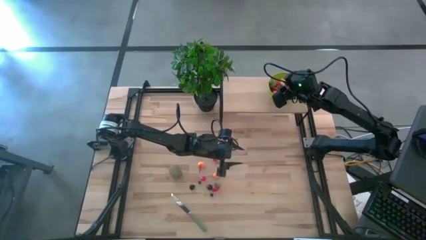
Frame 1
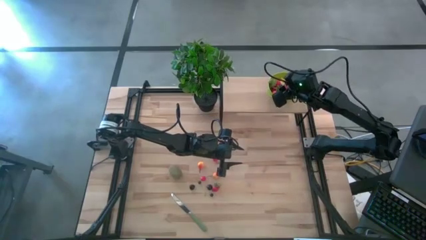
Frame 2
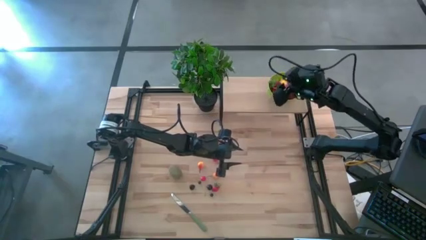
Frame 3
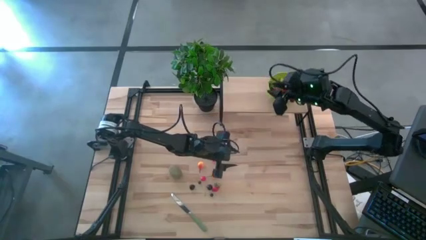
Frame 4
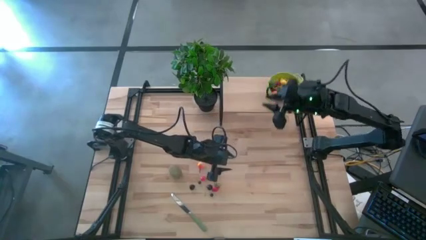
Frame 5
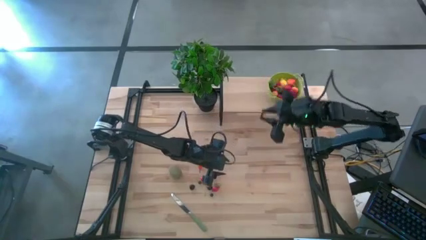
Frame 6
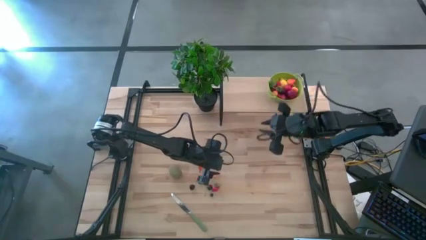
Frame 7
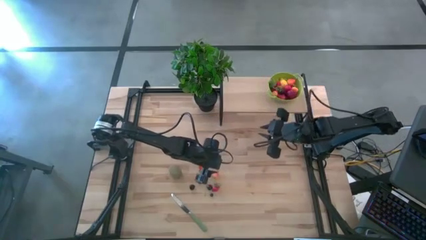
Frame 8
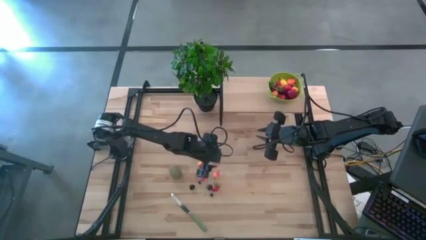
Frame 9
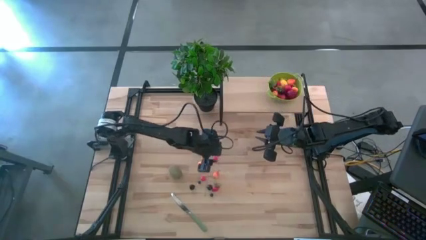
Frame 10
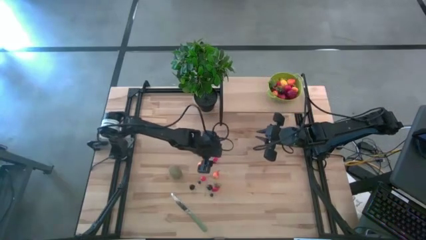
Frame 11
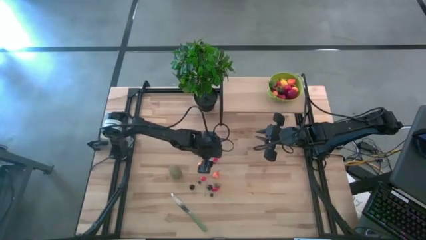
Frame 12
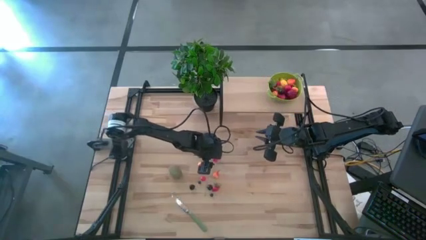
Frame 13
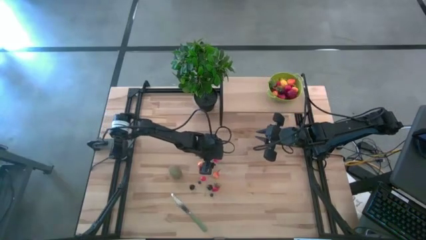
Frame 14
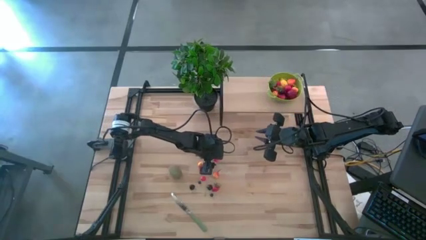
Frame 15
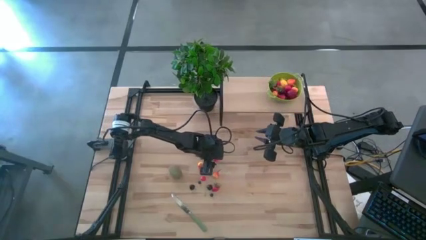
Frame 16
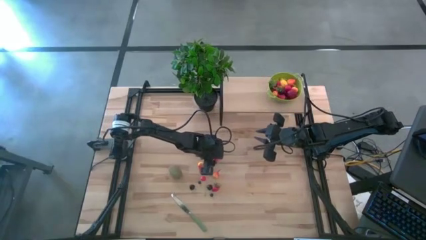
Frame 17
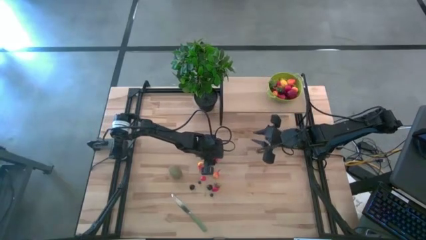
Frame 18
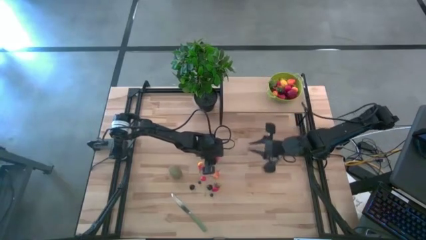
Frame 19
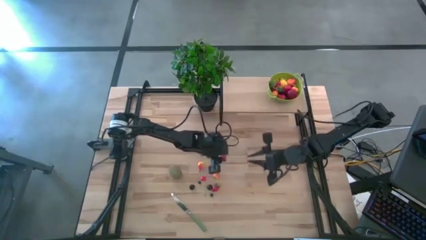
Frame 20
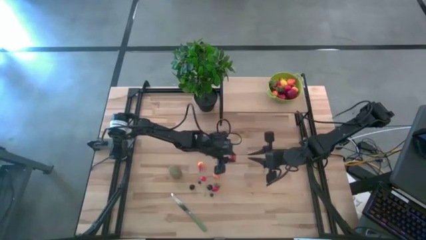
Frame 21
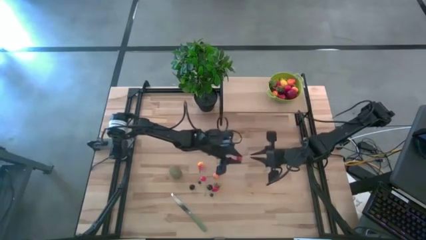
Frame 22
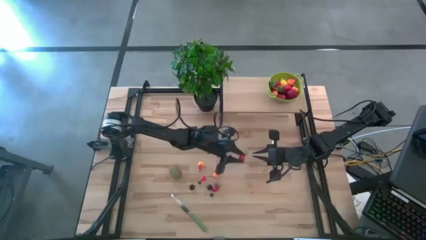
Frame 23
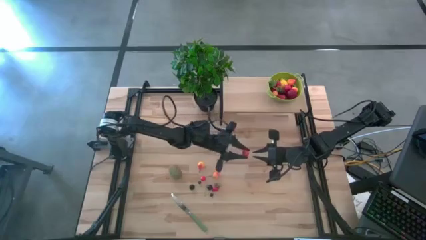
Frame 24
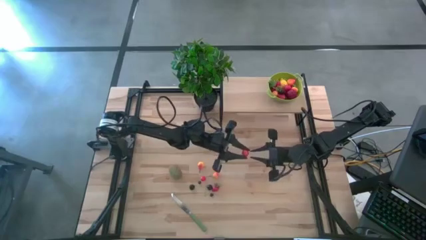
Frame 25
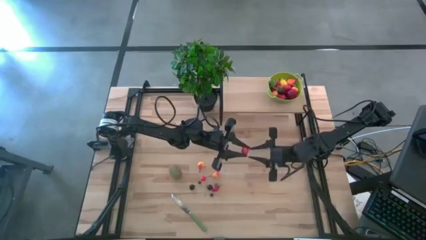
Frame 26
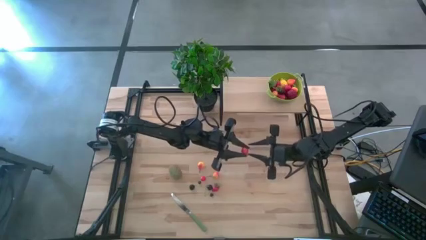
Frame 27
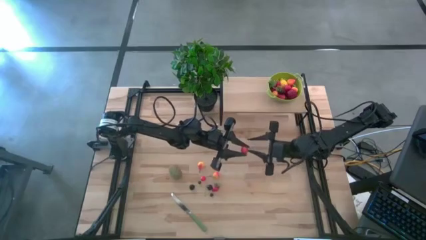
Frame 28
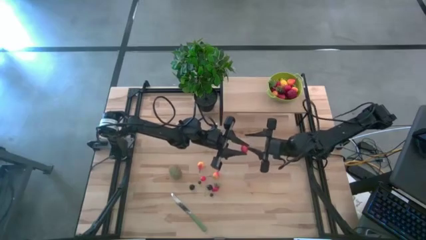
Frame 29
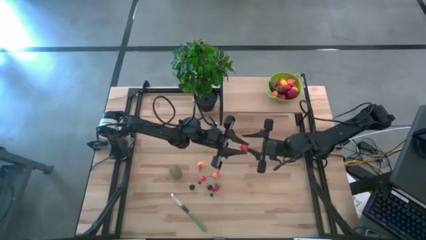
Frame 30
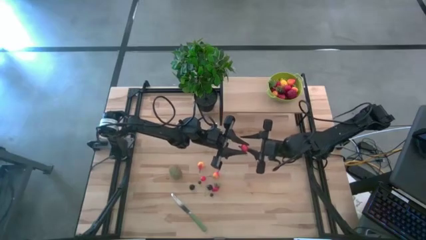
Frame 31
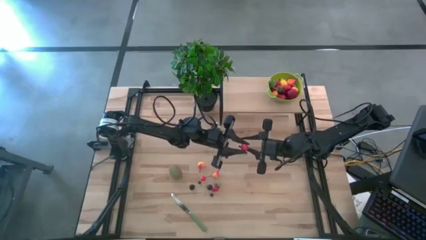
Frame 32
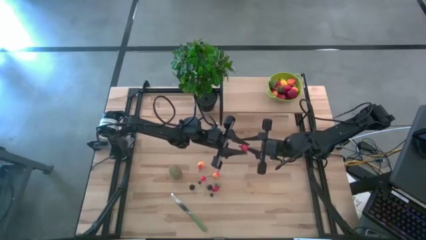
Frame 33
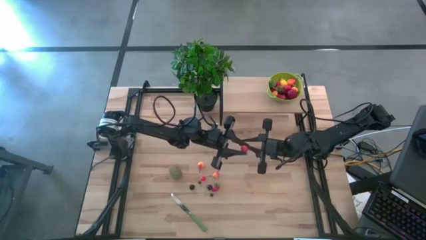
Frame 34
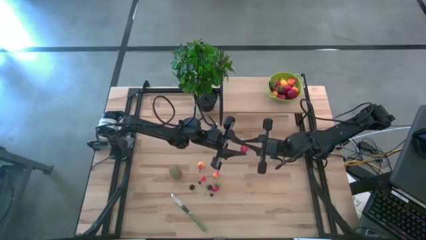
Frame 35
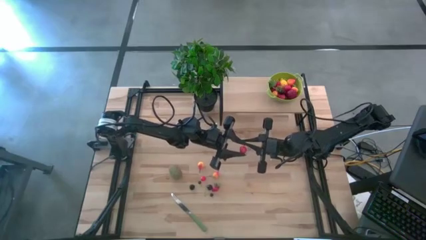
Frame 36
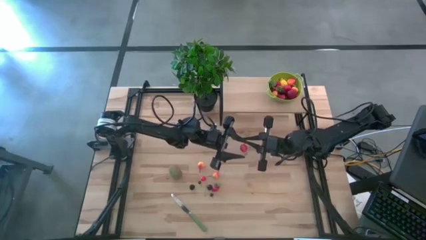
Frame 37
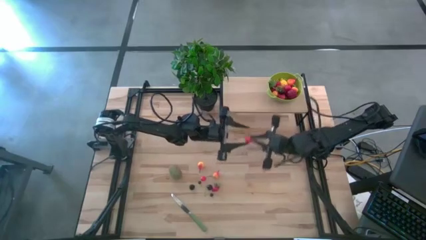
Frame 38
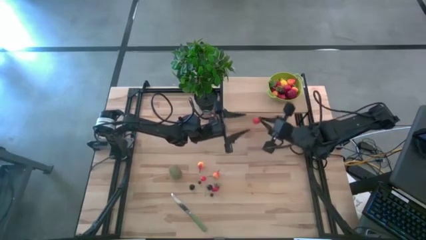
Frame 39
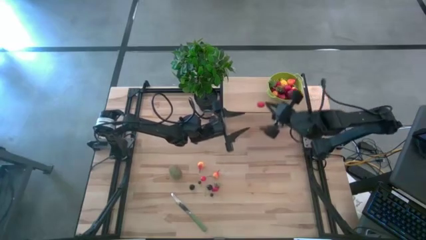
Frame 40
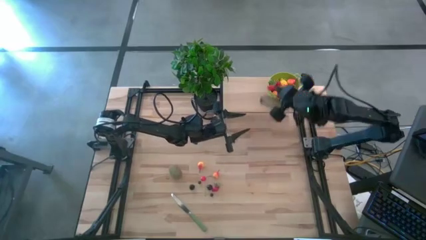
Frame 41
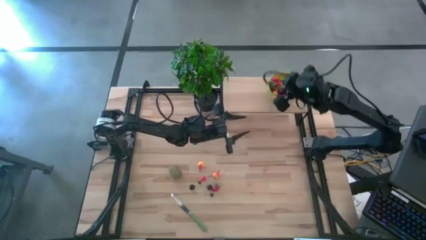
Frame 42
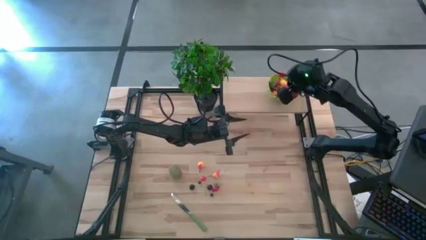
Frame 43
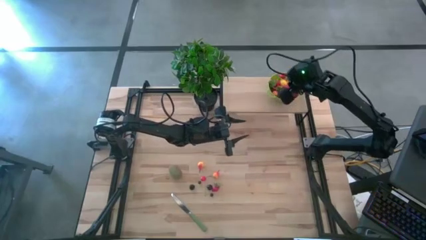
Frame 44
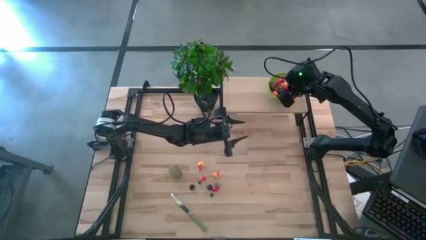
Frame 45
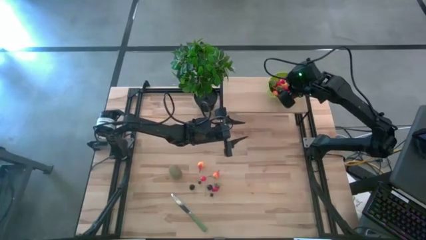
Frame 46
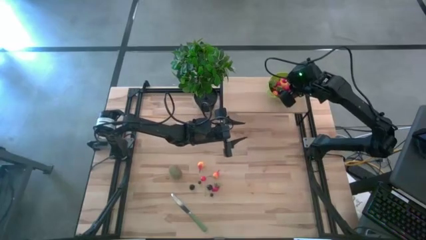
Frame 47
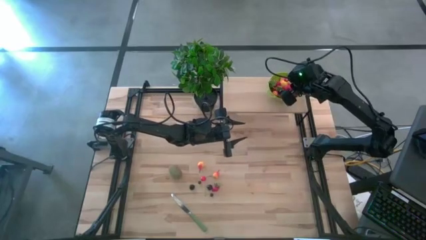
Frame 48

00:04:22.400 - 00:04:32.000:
Task: Pick & Place Fruit
Put the red cherry into the green strainer bowl on the shelf

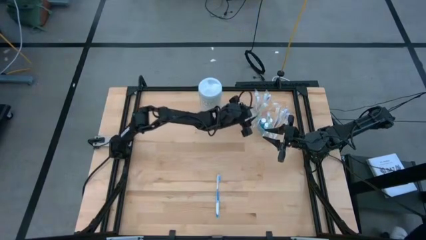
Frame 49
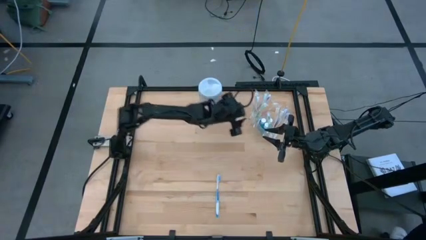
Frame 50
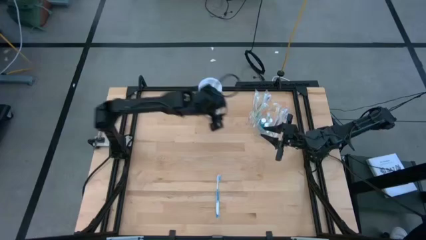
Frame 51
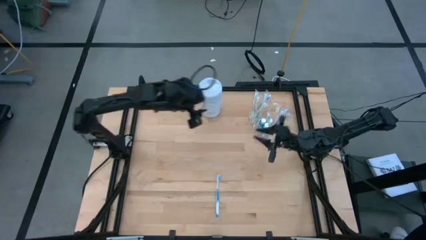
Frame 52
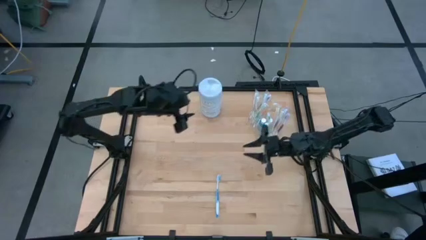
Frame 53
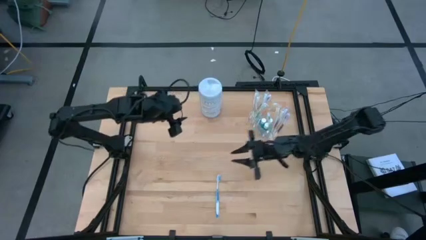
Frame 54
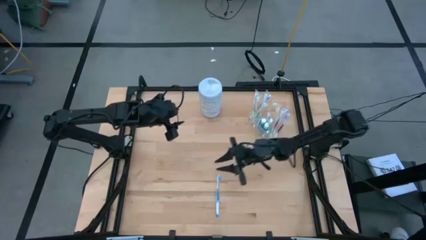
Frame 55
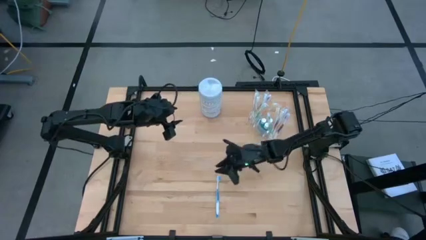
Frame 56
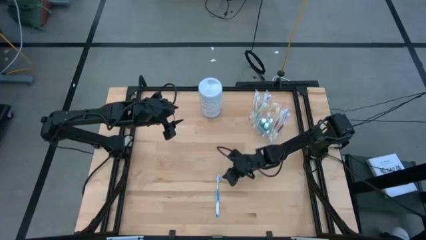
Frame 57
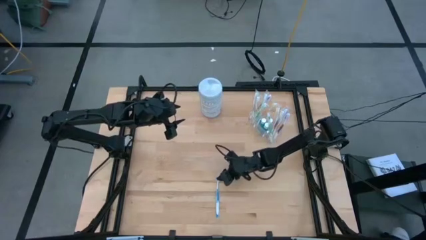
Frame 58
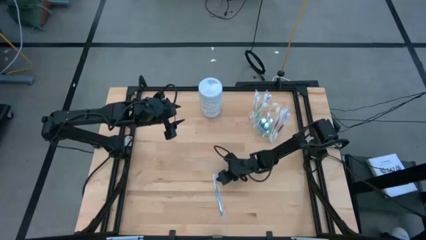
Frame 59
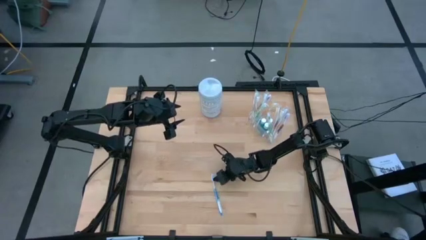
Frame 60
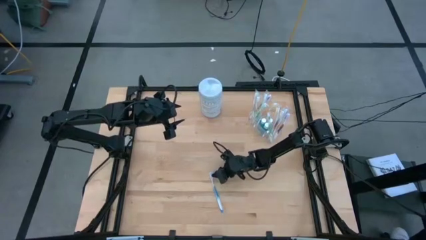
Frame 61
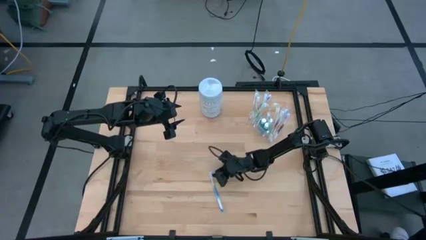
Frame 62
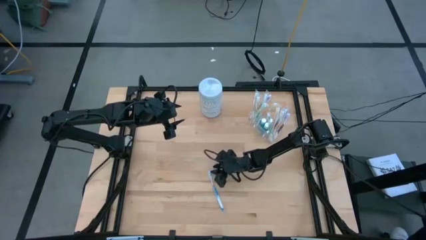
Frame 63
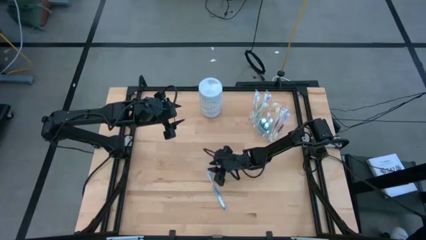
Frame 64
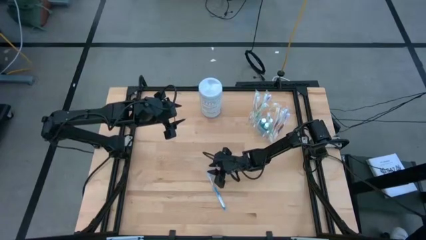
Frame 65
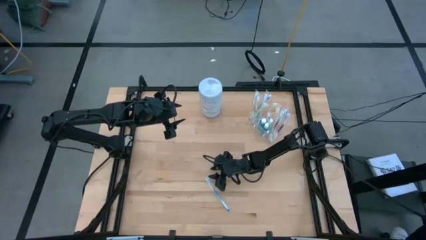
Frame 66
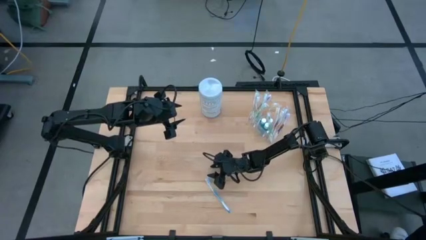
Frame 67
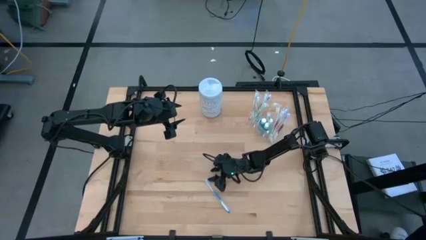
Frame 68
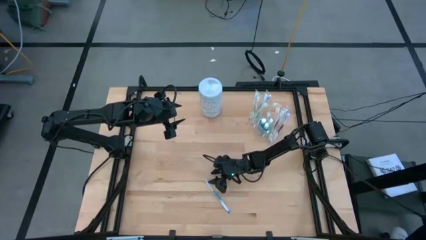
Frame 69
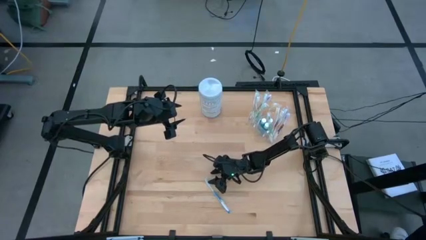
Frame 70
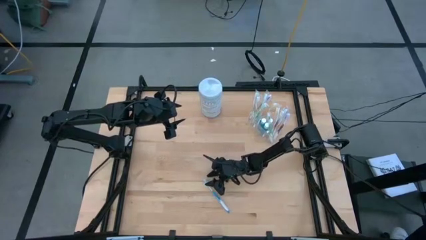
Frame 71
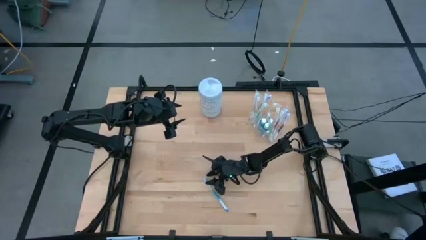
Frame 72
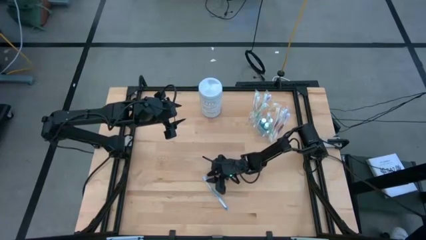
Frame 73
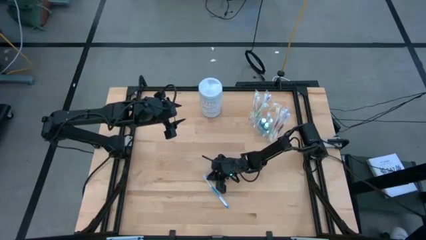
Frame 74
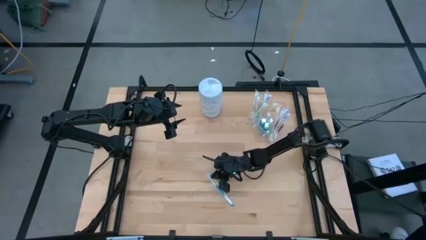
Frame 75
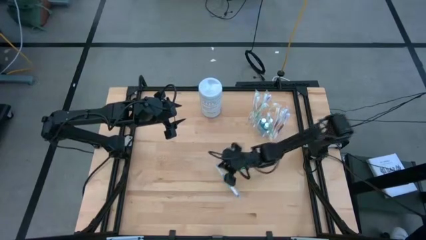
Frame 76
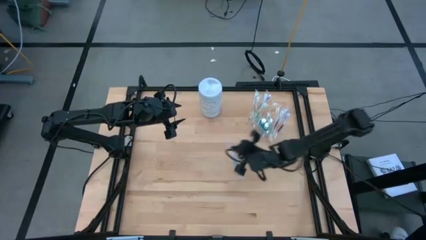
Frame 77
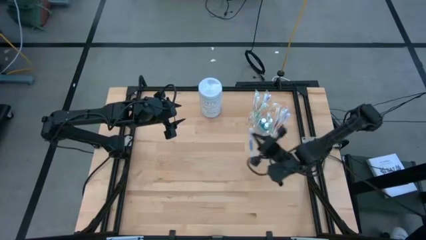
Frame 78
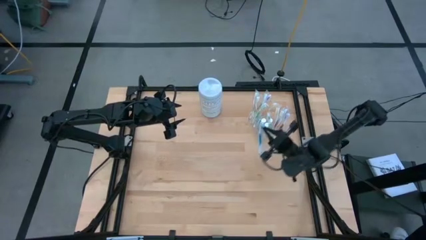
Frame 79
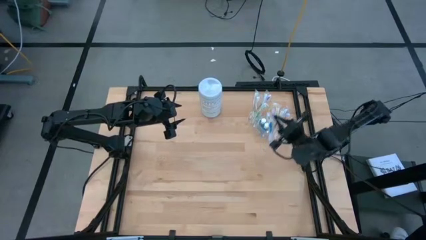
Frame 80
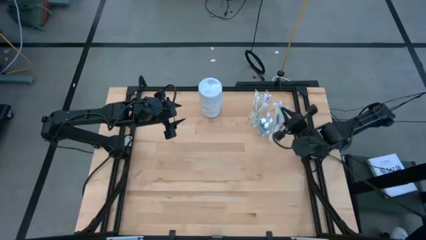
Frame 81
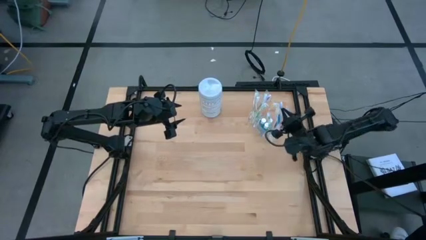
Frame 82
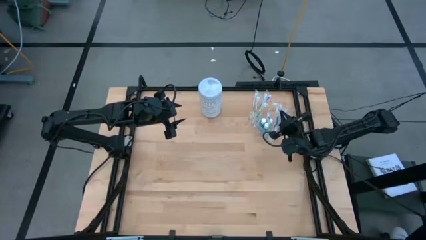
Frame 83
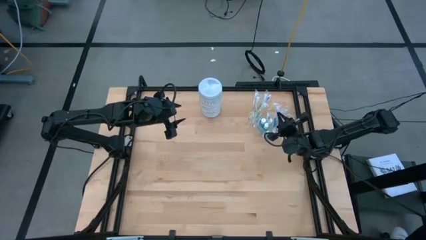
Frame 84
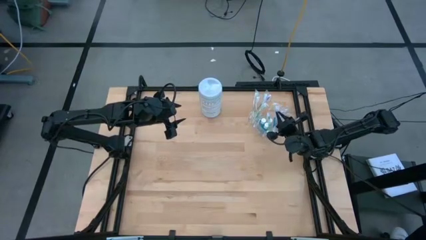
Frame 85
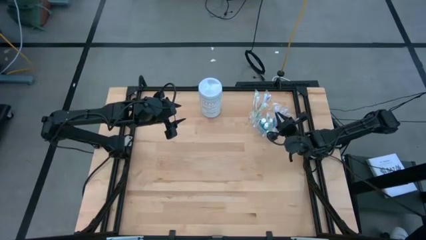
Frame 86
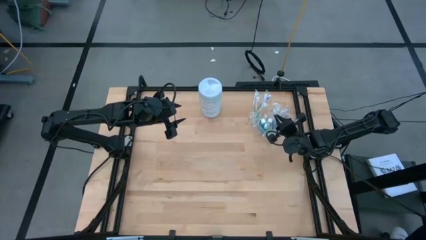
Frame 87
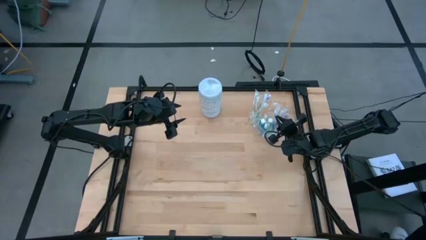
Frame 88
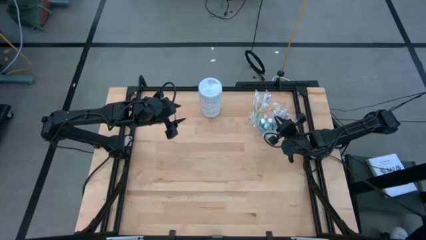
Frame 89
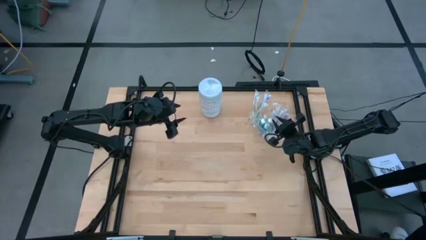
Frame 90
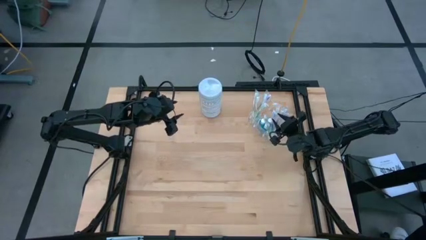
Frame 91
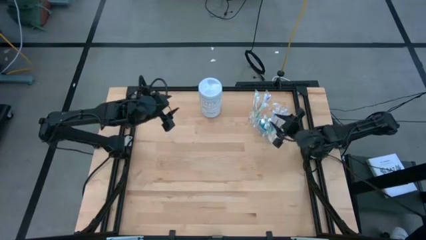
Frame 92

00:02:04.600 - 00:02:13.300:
Task: Pick & Place toothbrushing station
Put the blue toothbrush into the transparent organizer
